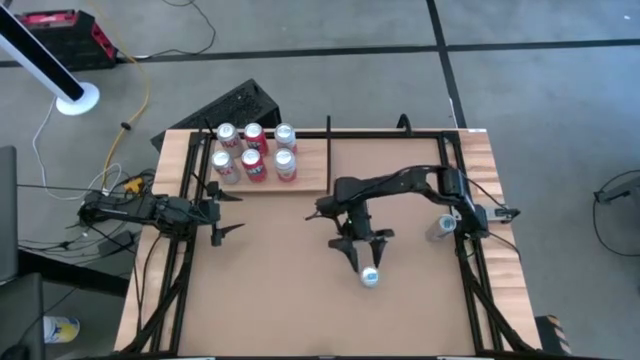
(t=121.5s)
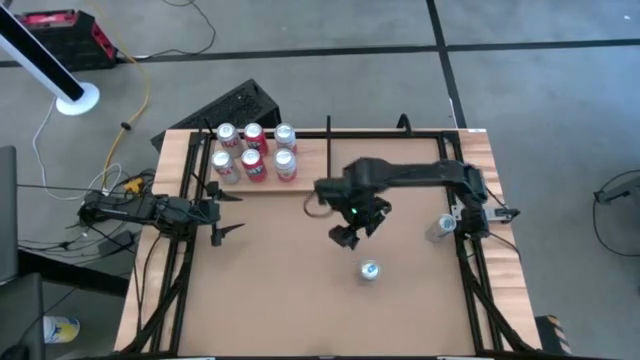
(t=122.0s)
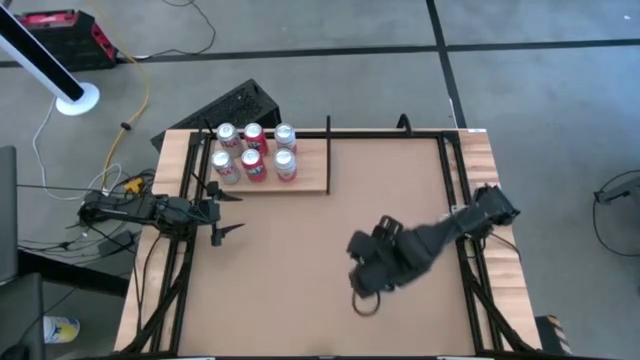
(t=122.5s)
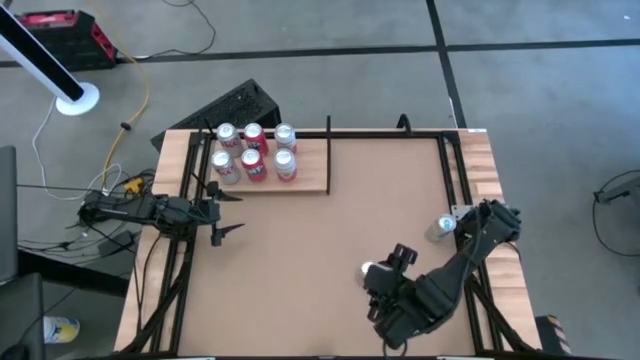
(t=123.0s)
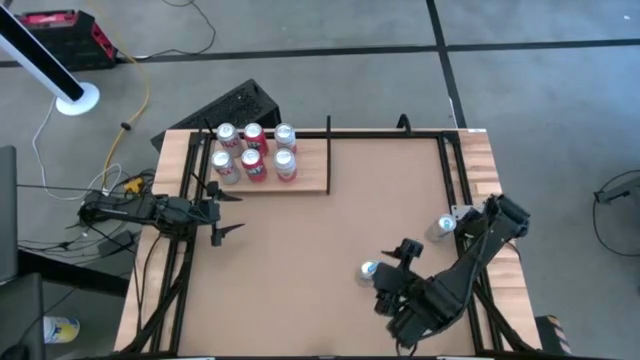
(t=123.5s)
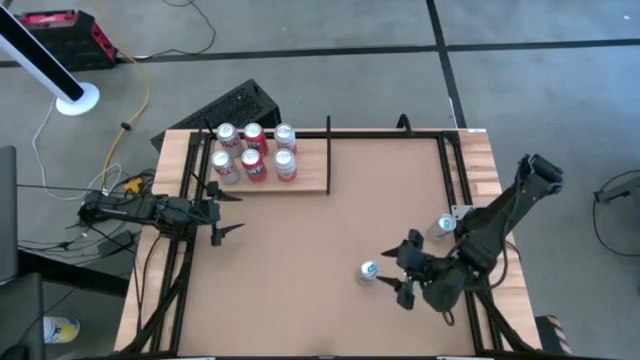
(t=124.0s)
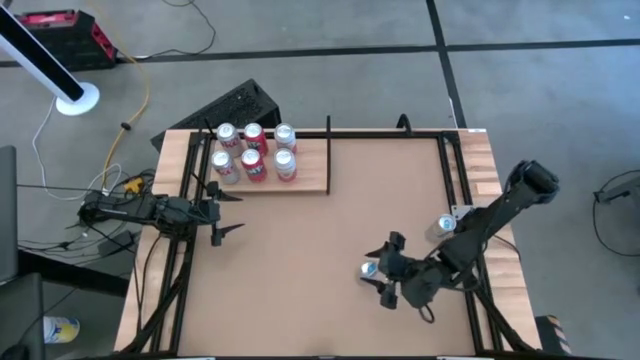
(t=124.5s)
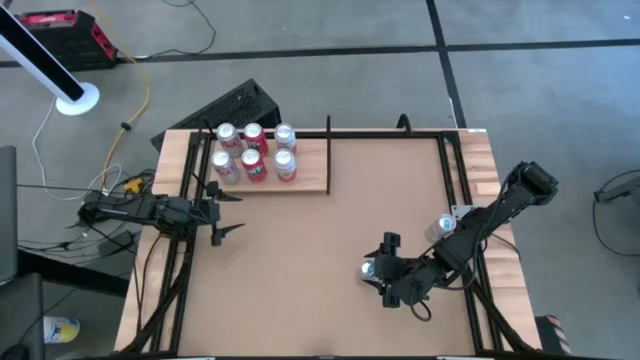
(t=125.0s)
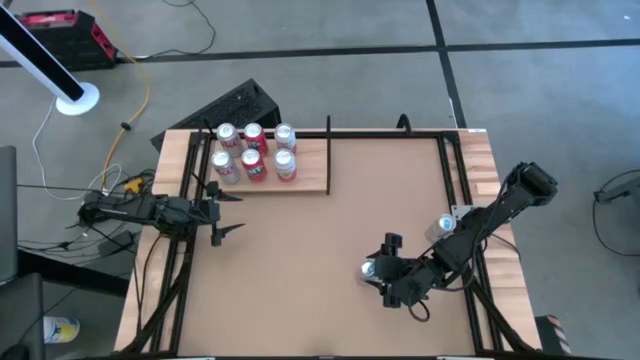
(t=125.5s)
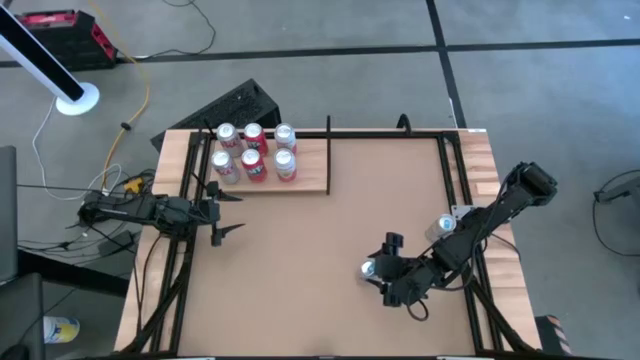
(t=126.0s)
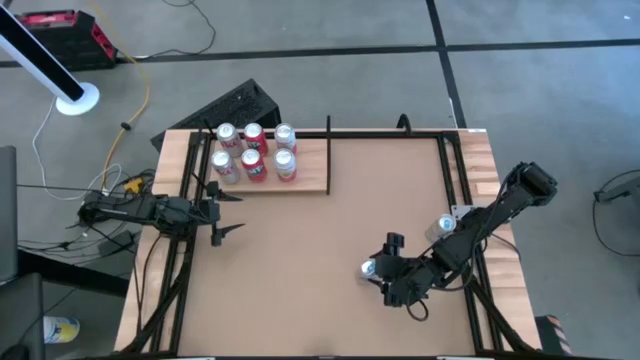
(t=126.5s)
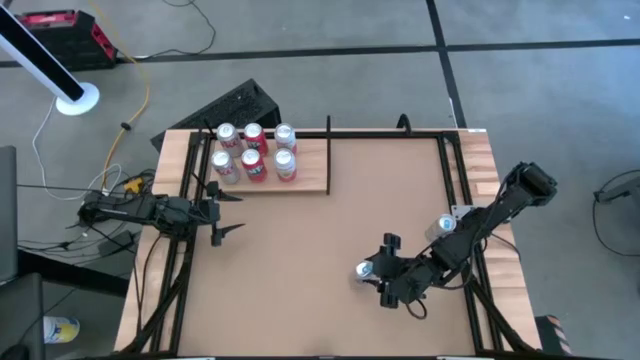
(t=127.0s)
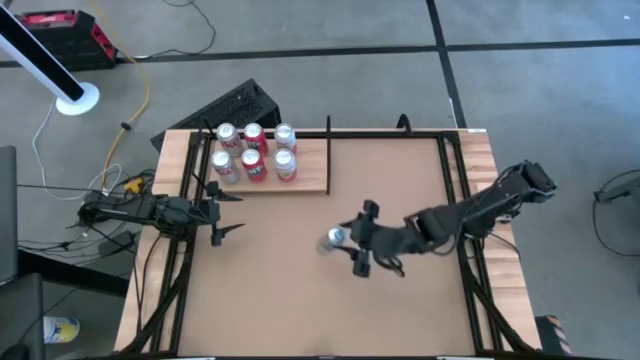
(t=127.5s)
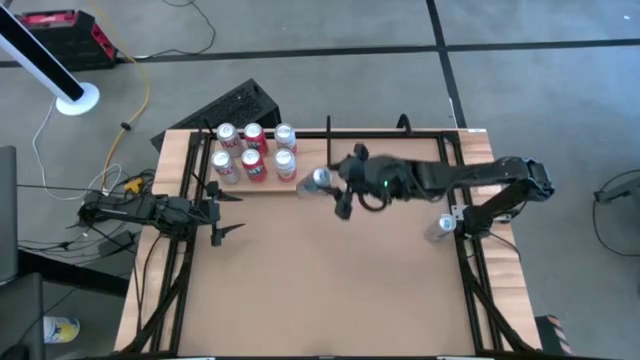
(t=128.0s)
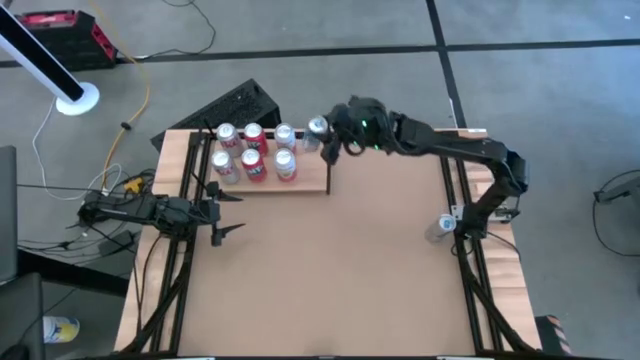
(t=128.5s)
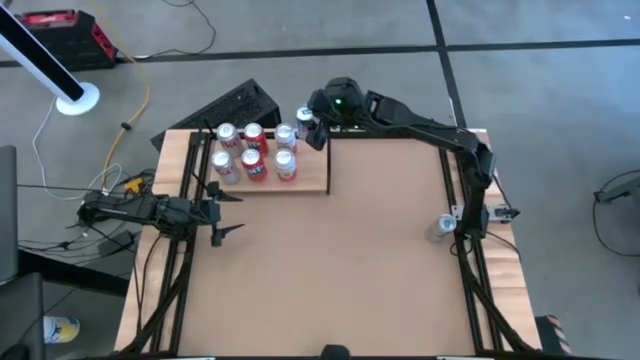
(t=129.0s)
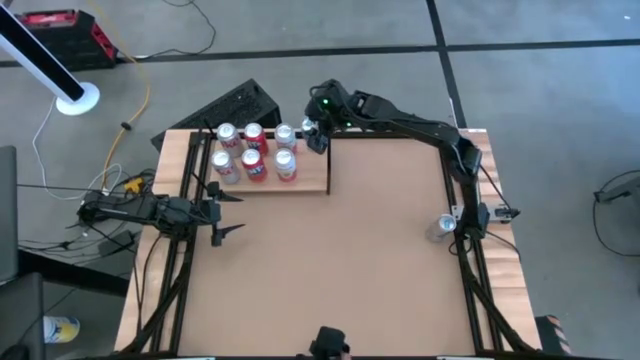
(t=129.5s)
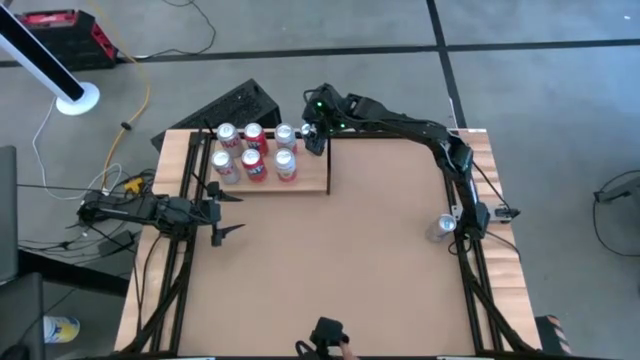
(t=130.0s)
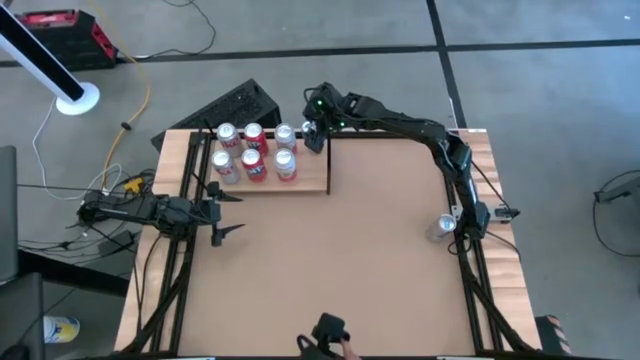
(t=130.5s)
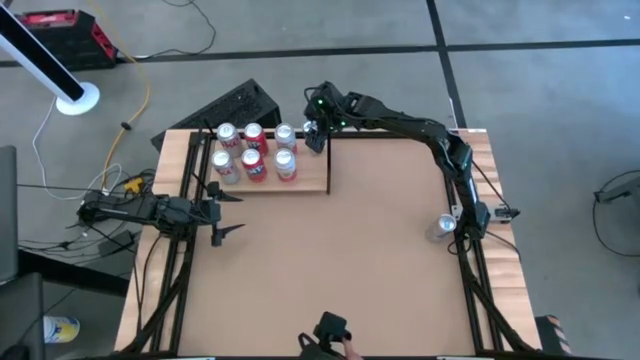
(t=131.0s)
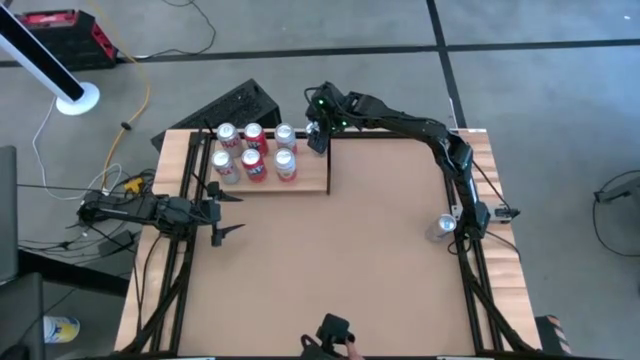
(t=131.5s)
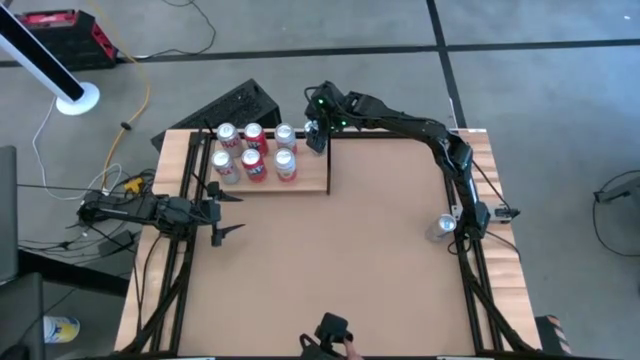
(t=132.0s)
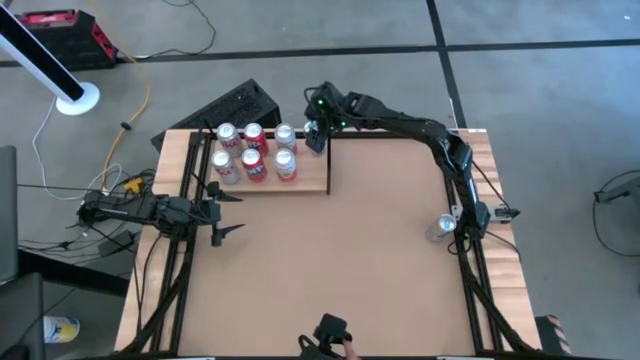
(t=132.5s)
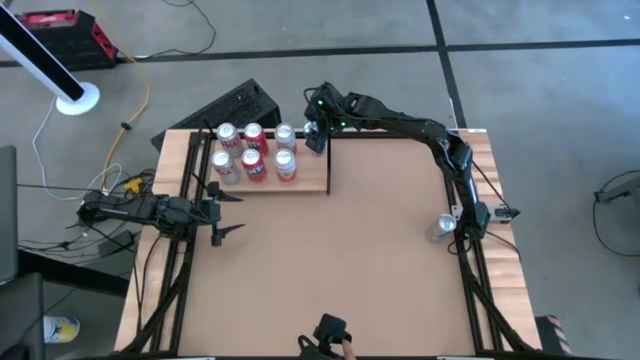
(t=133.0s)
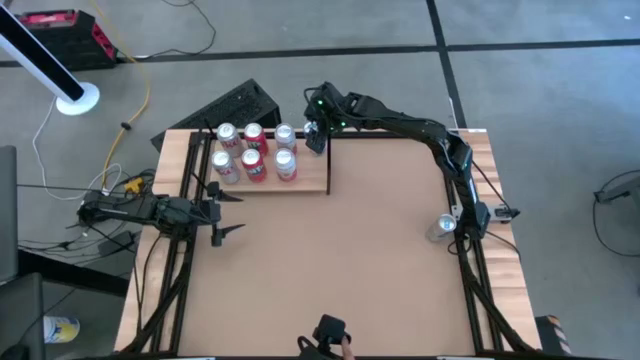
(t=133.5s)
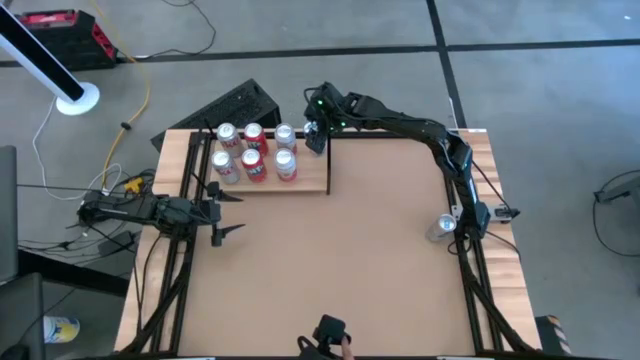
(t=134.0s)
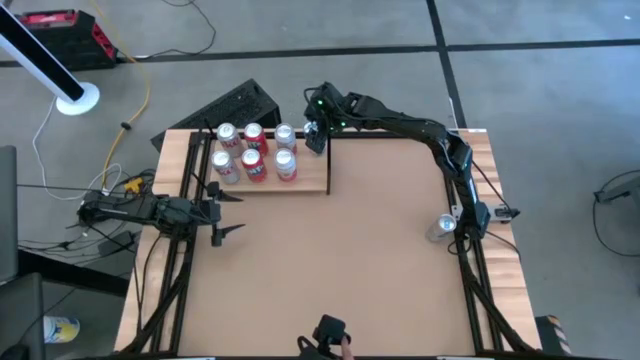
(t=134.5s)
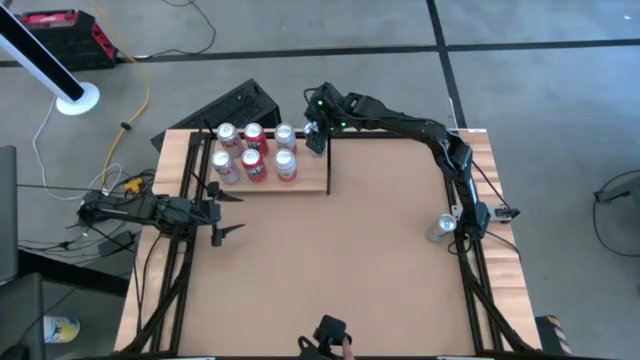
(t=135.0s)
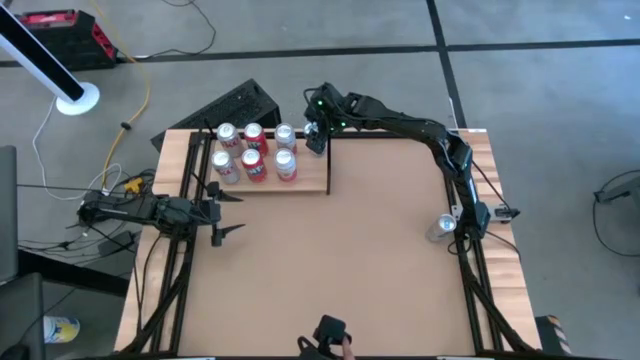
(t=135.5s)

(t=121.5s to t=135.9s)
Task: Place canned beverage on shelf
Put the bottom blue soda can on the shelf

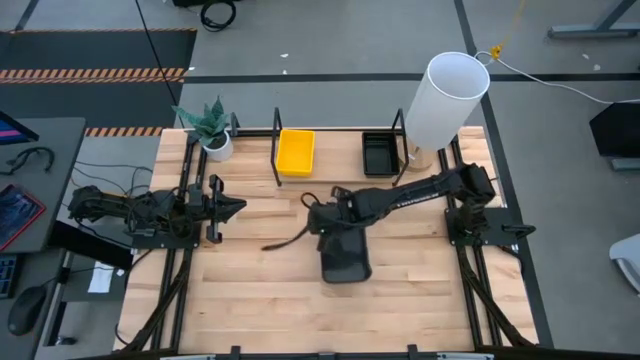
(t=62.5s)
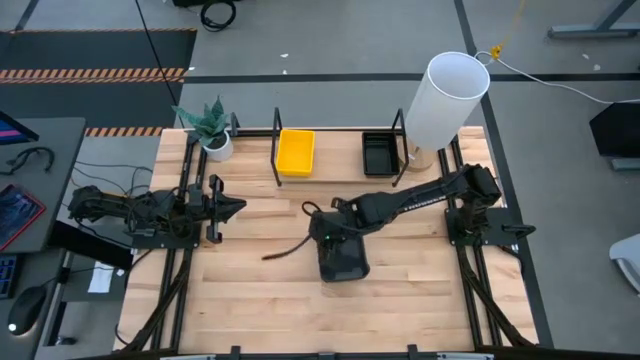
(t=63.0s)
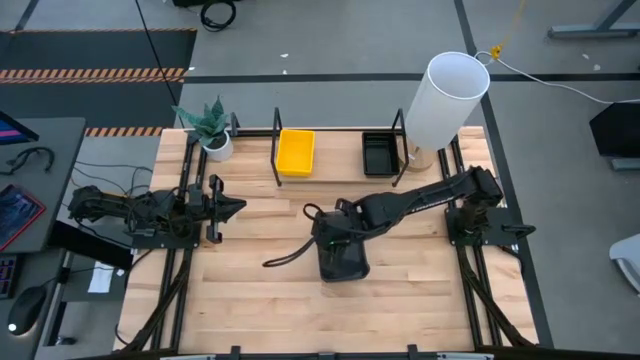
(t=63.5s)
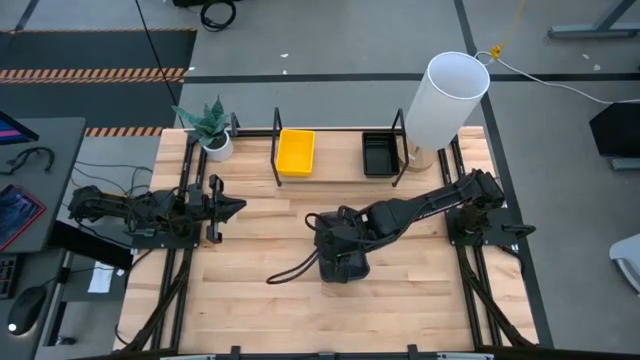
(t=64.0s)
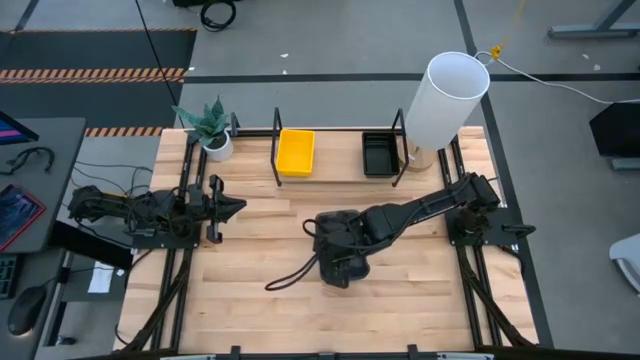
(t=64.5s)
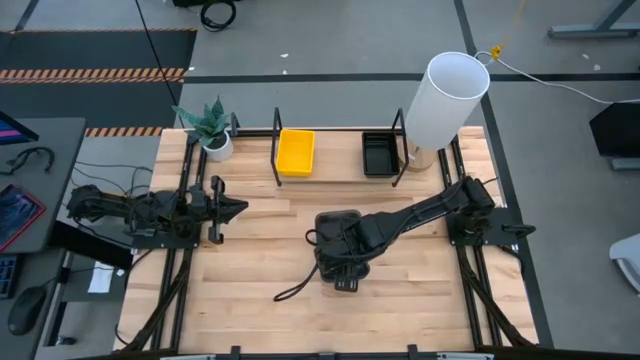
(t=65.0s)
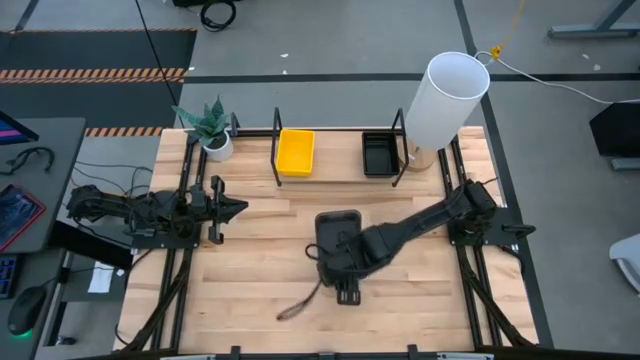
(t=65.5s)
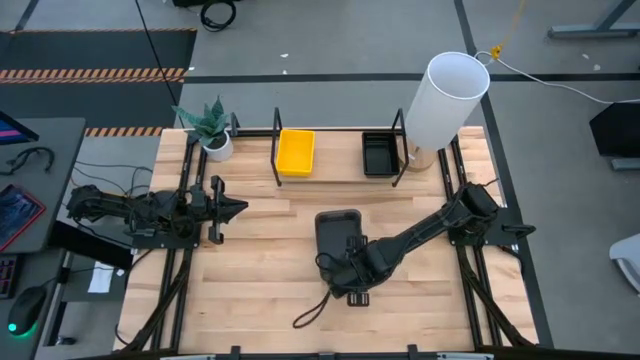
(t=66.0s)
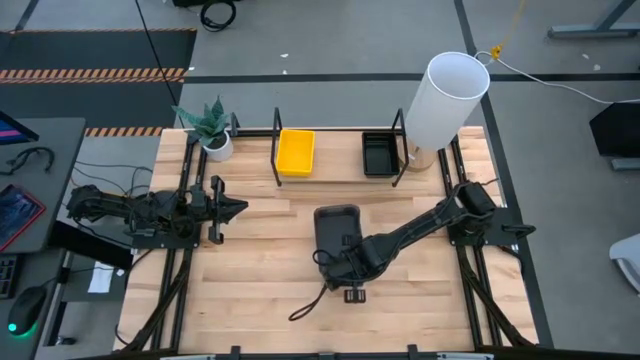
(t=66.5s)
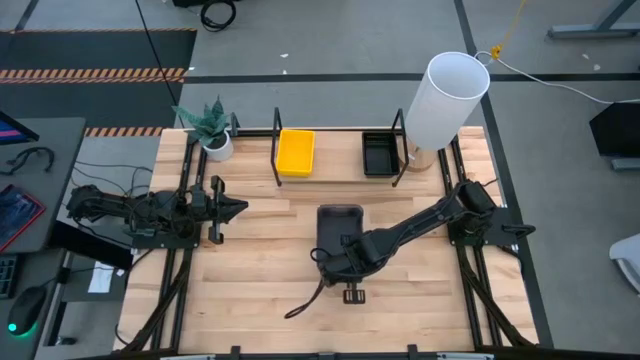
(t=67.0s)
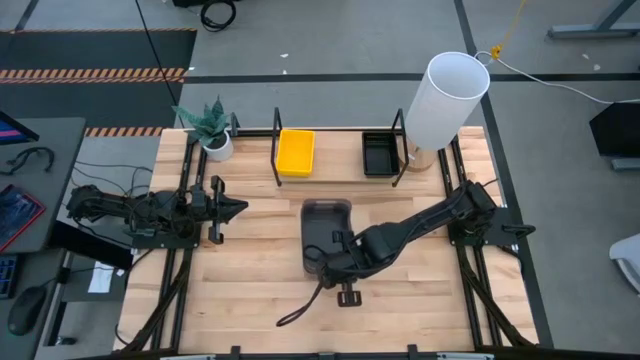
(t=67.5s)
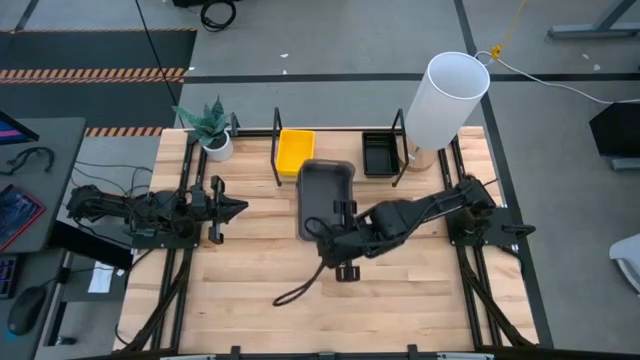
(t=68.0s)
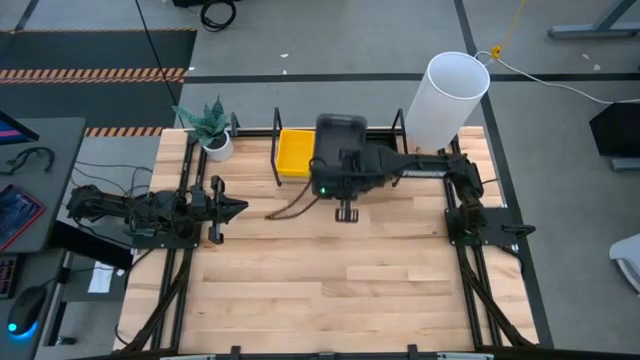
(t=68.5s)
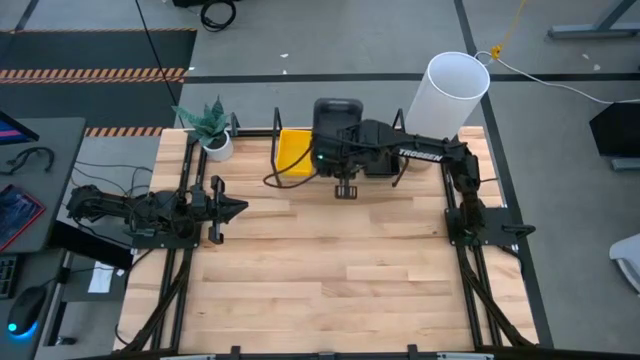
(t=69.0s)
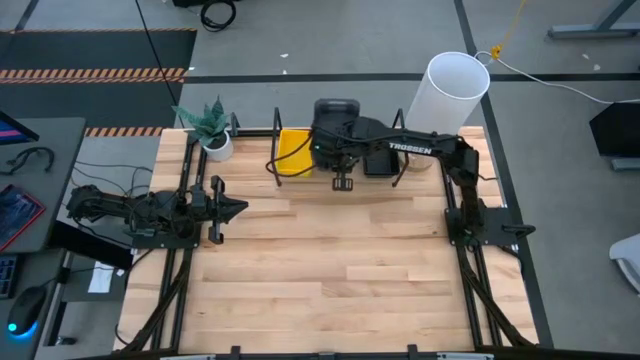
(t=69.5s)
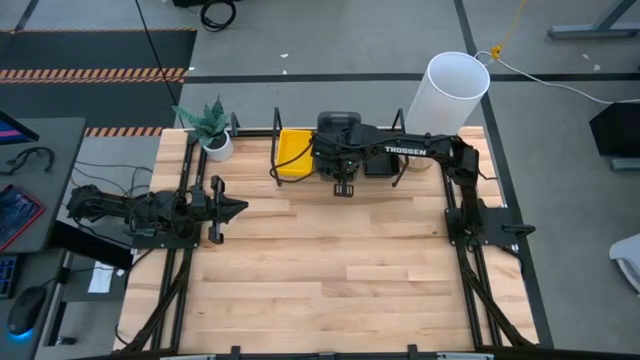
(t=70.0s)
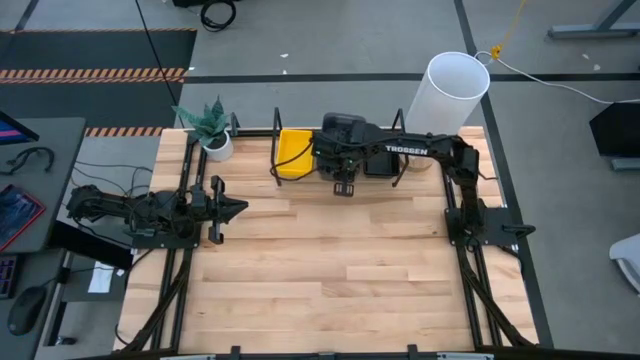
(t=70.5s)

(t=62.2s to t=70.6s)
Task: Stack baskets on shelf by color
Put the stacked transparent black bins on the shelf
